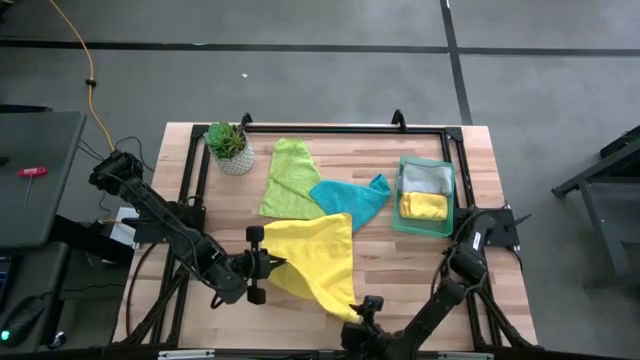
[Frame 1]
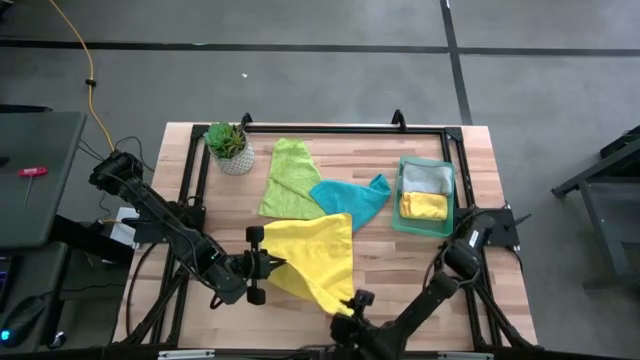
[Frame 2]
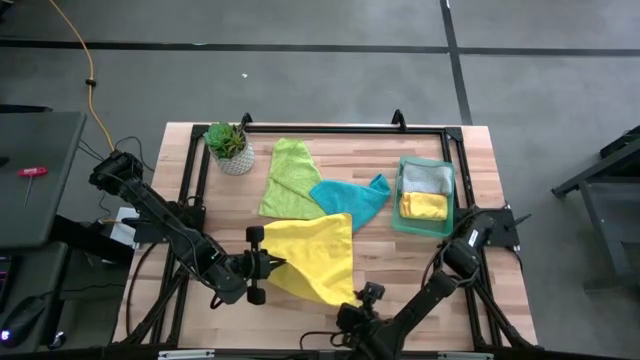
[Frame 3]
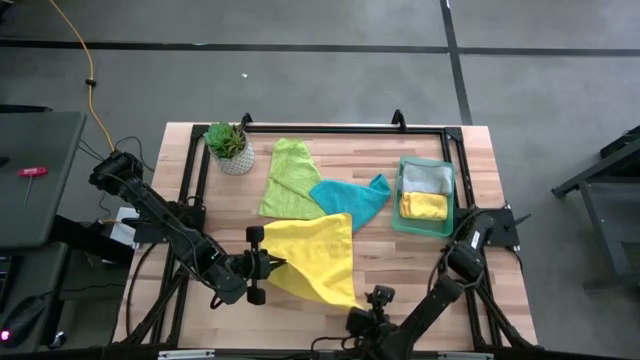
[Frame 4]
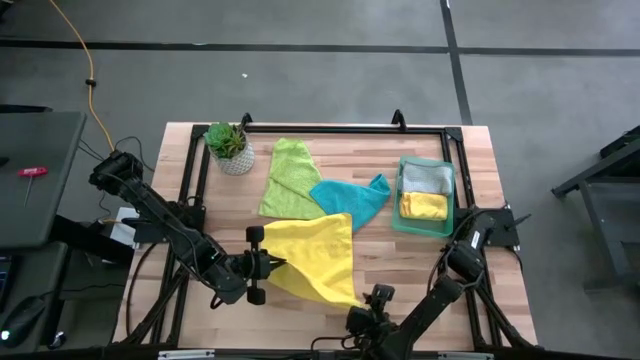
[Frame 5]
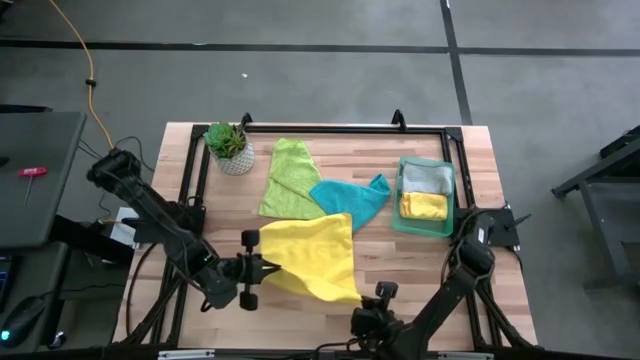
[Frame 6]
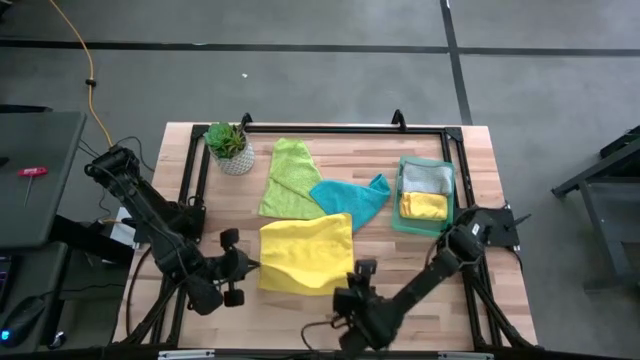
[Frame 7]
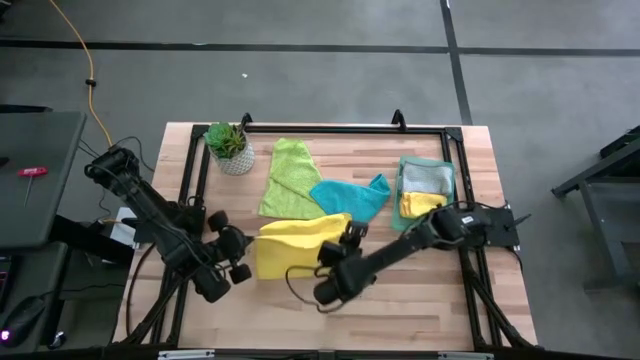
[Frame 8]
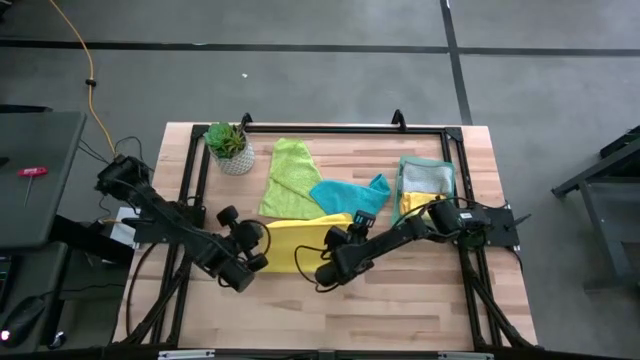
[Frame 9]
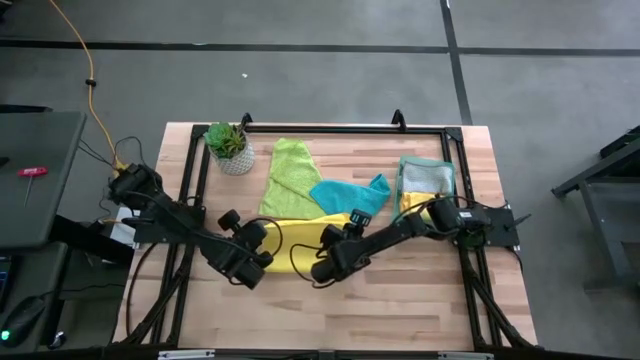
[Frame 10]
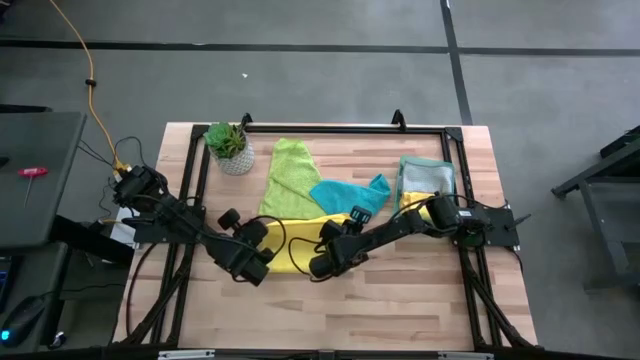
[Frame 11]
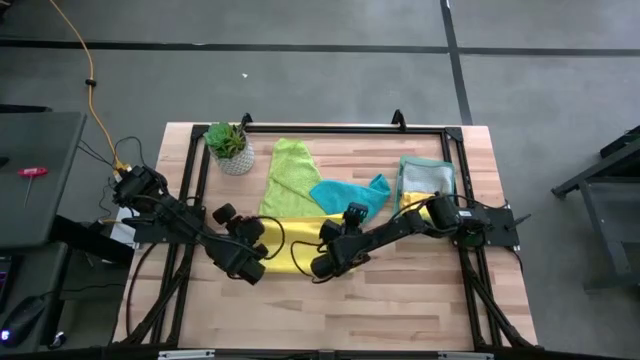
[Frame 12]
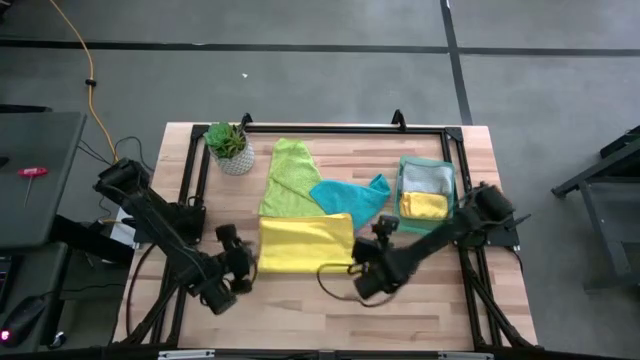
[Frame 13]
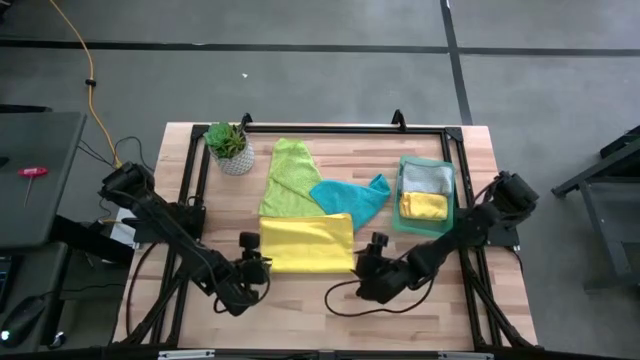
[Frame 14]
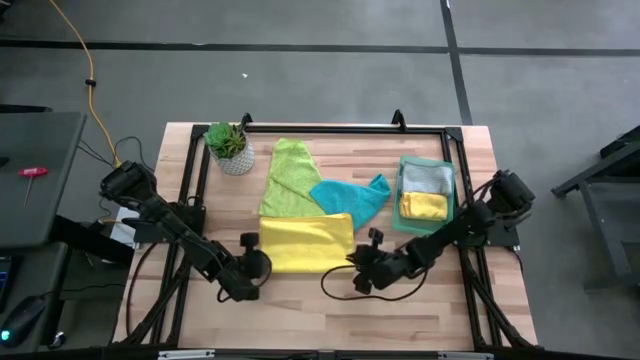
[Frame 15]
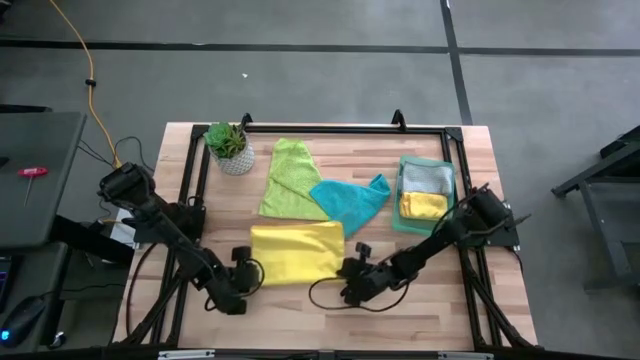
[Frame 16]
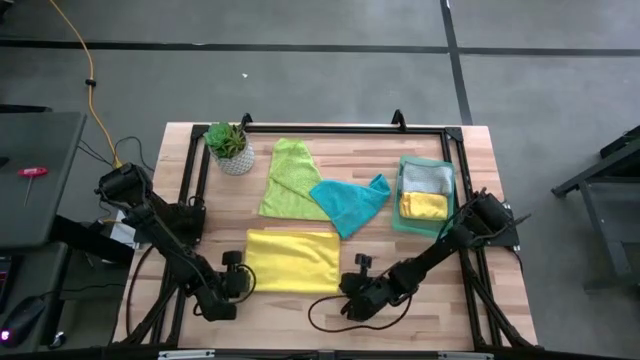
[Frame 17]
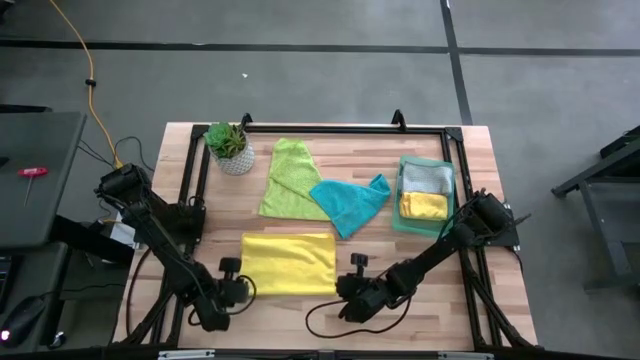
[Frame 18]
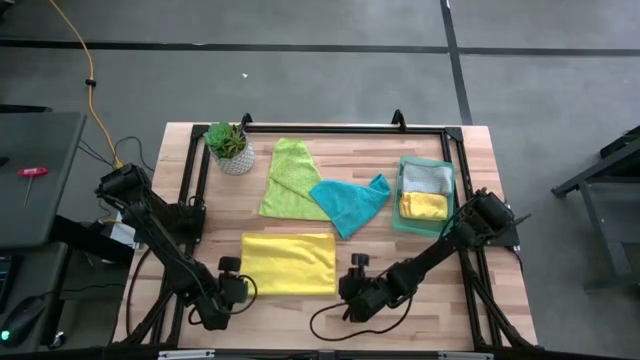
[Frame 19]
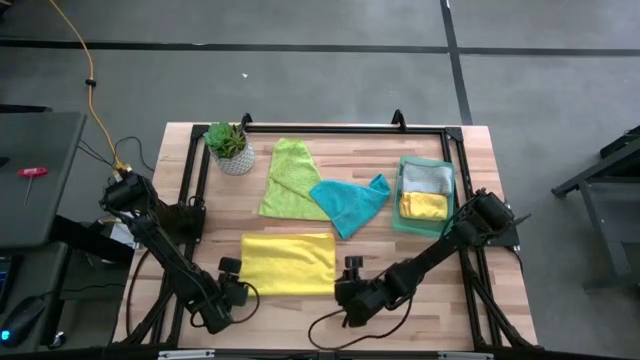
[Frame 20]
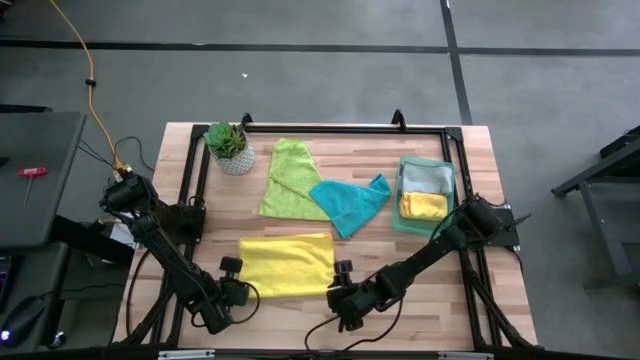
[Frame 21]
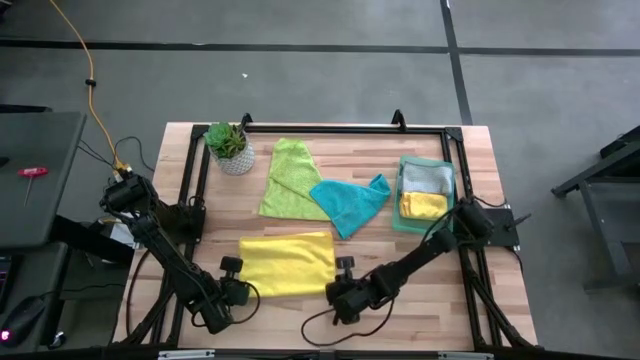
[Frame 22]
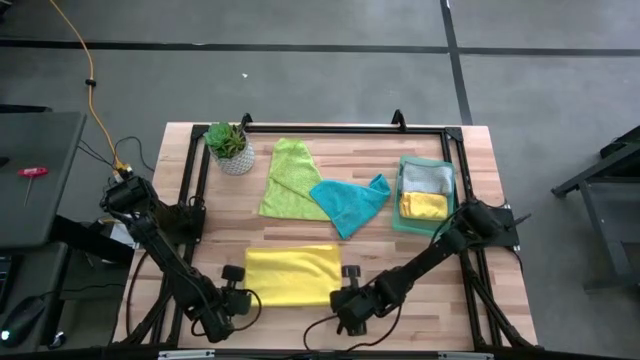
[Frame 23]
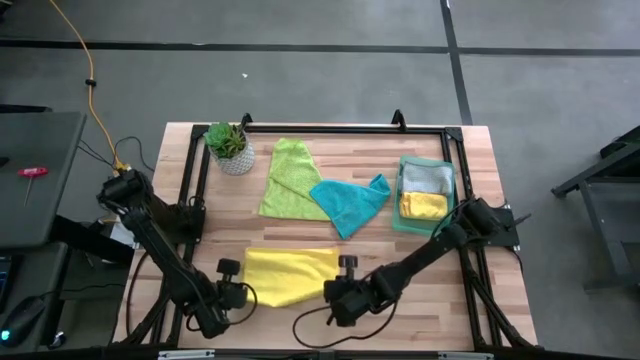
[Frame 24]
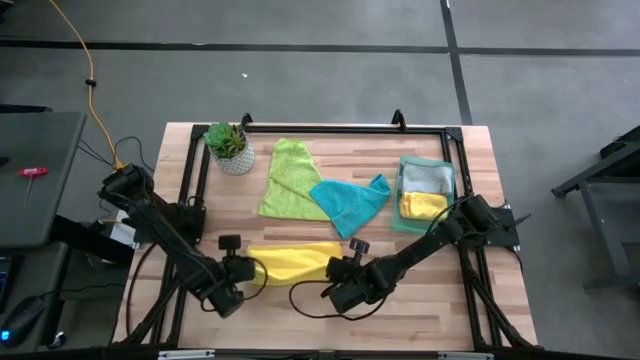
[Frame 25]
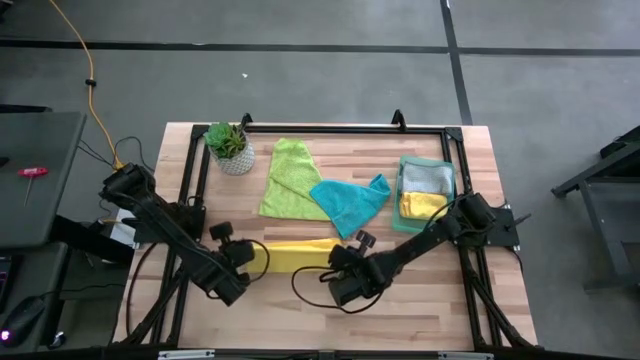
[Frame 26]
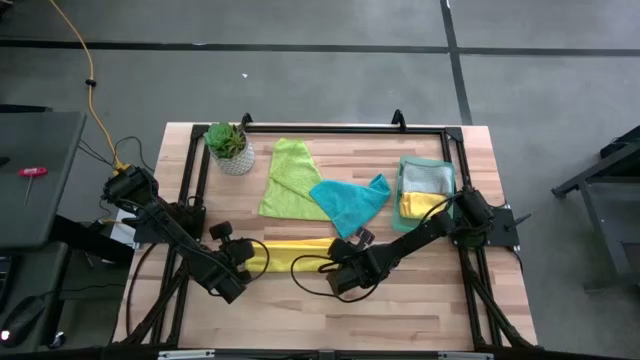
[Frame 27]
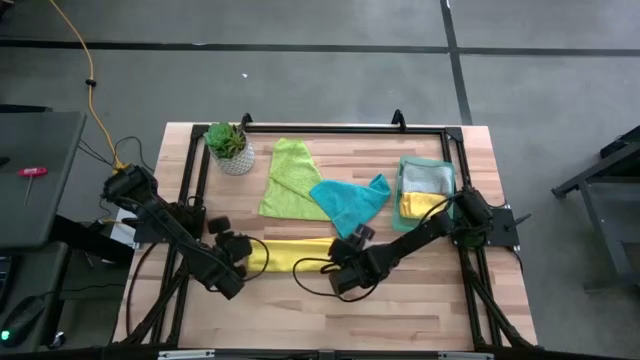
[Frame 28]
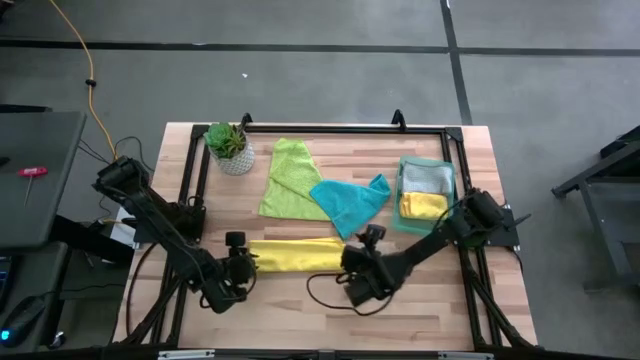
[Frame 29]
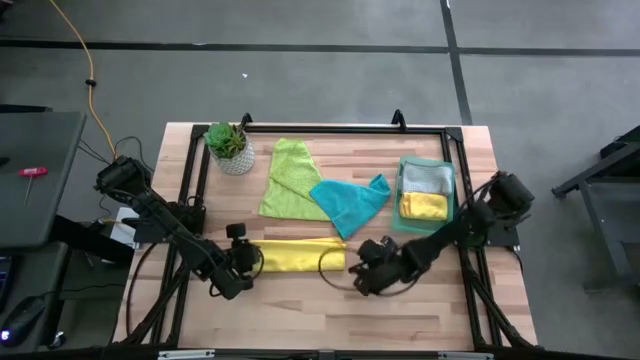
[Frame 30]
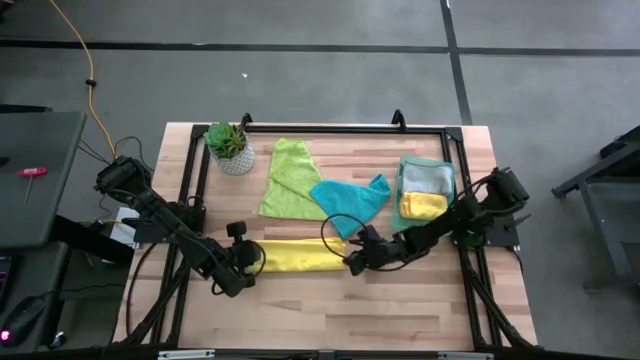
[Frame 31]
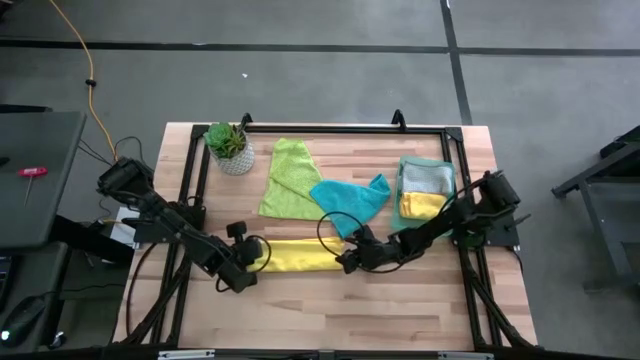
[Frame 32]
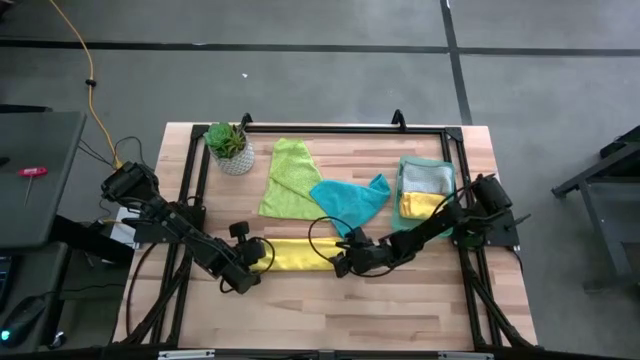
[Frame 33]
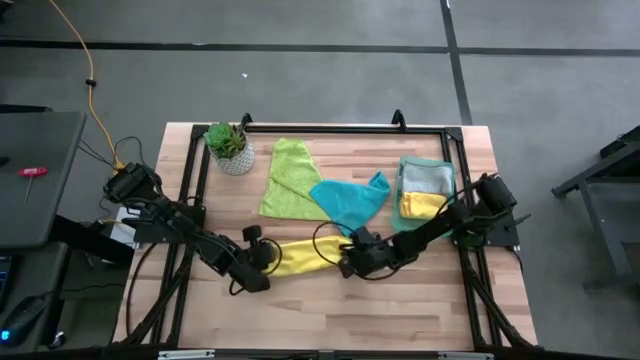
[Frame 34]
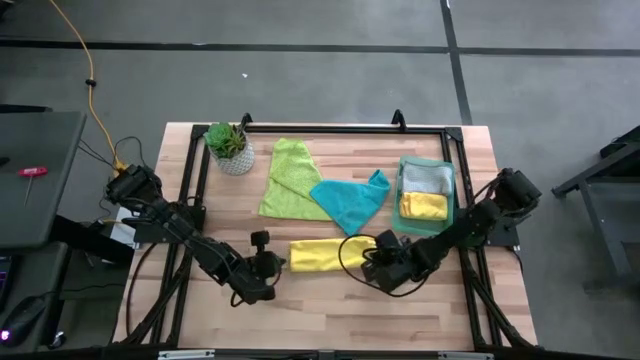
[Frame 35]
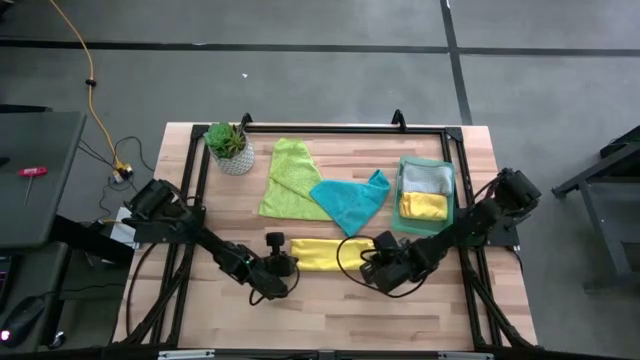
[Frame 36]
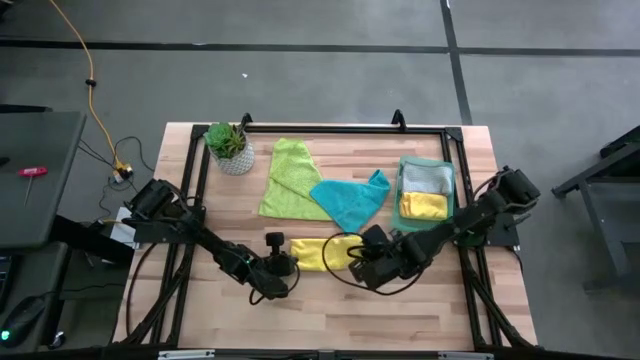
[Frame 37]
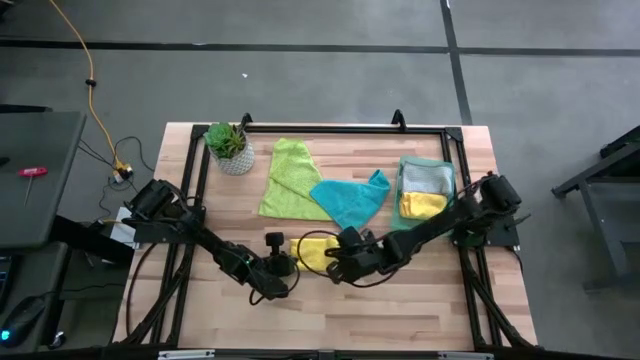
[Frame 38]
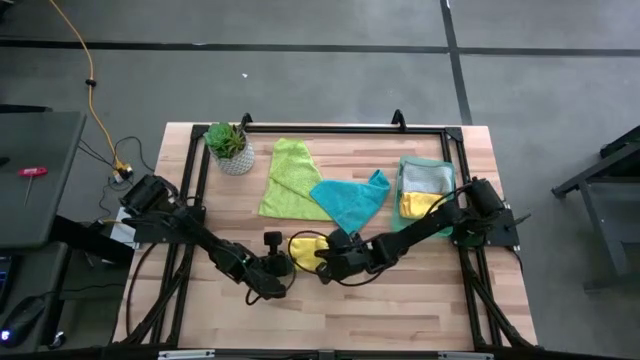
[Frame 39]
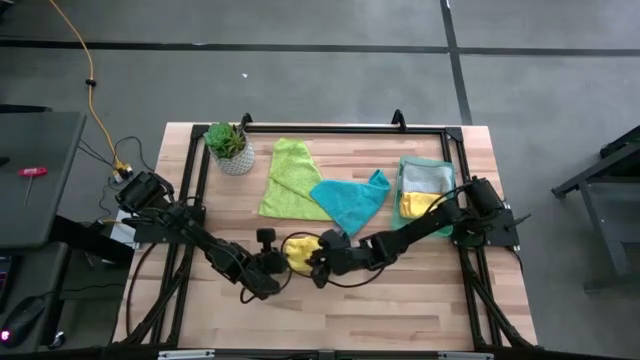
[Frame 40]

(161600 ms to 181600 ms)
Task: Fold microfiber towels
Fold the yellow microfiber cloth
